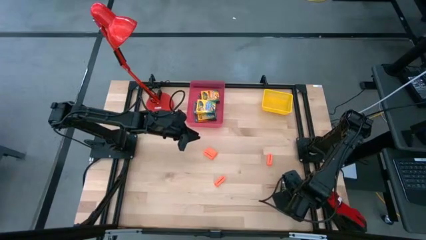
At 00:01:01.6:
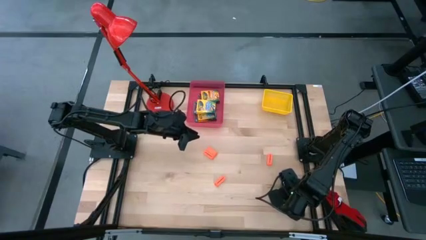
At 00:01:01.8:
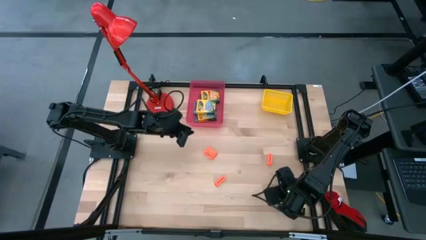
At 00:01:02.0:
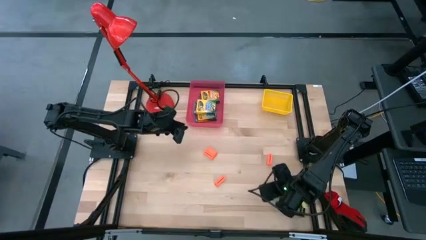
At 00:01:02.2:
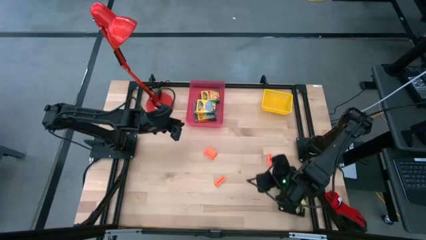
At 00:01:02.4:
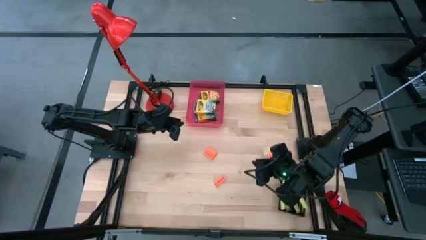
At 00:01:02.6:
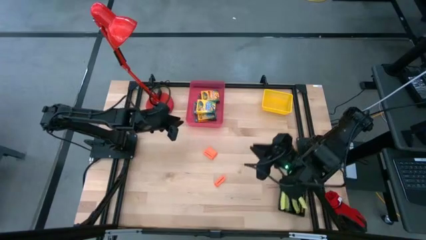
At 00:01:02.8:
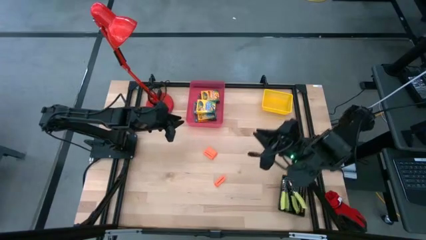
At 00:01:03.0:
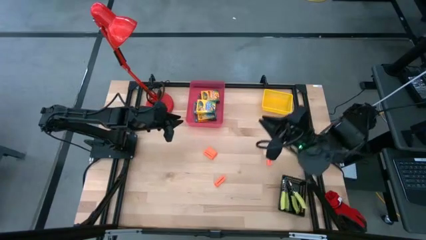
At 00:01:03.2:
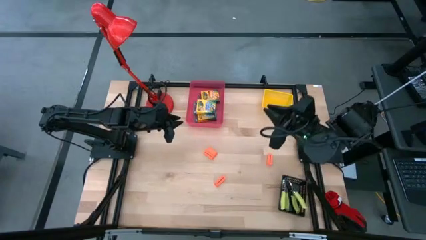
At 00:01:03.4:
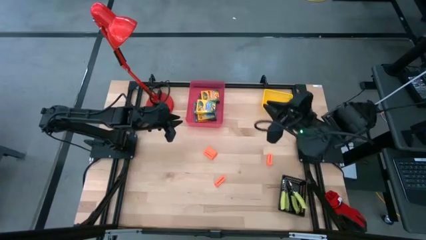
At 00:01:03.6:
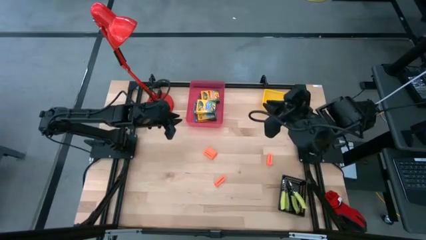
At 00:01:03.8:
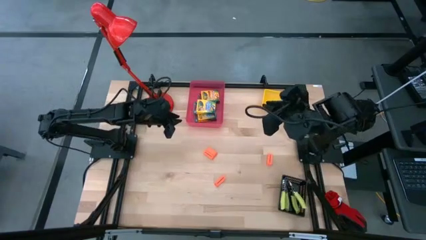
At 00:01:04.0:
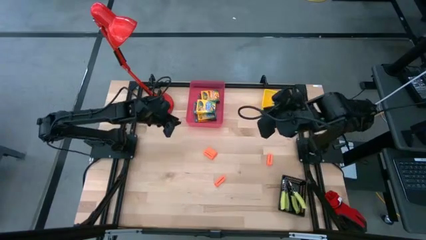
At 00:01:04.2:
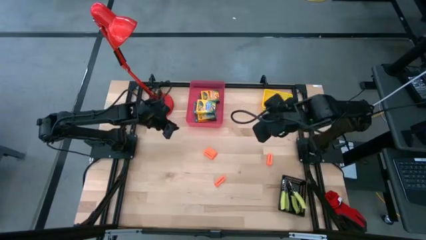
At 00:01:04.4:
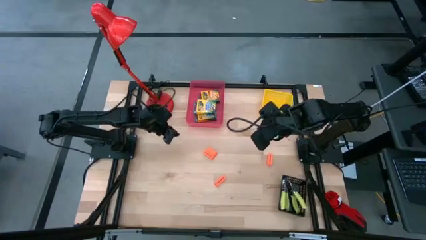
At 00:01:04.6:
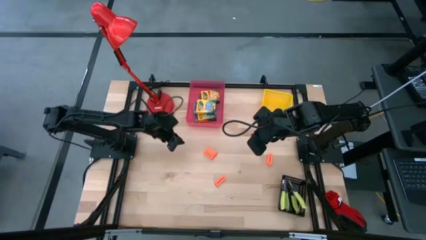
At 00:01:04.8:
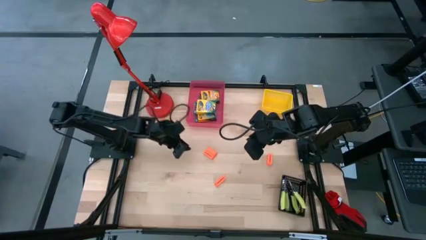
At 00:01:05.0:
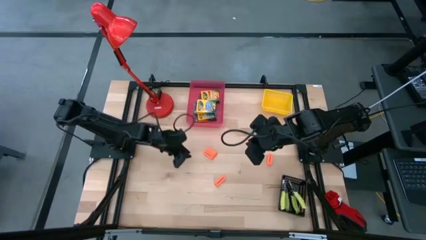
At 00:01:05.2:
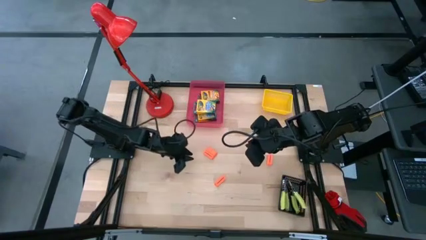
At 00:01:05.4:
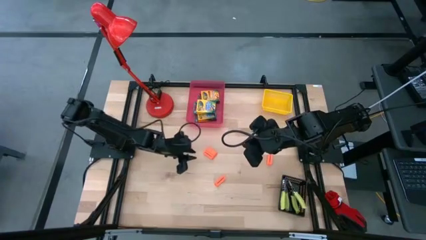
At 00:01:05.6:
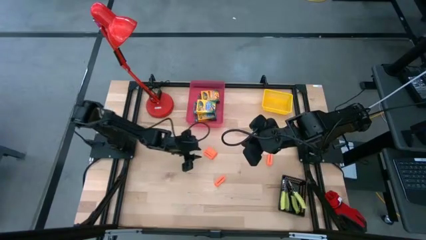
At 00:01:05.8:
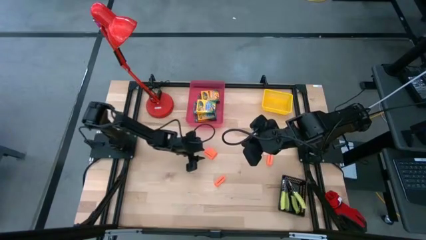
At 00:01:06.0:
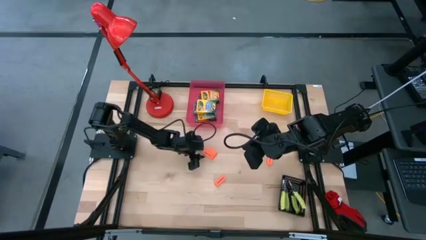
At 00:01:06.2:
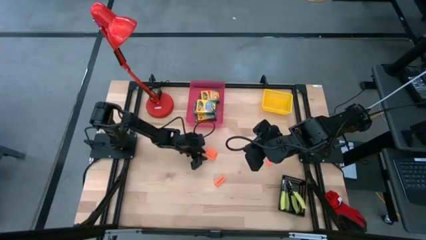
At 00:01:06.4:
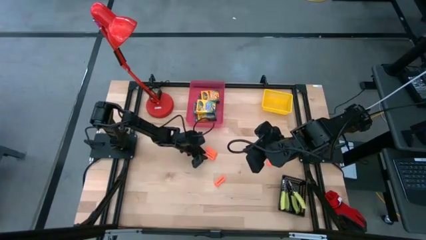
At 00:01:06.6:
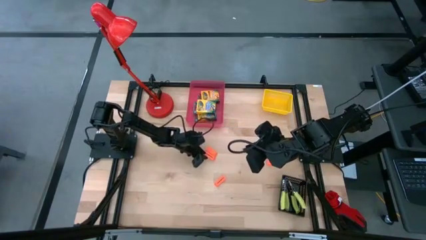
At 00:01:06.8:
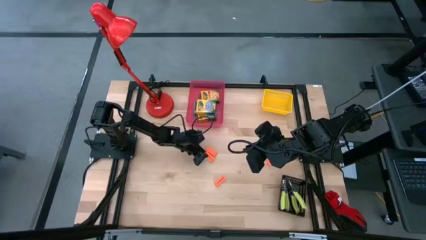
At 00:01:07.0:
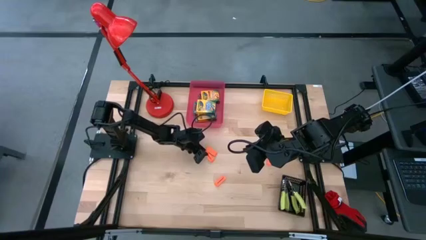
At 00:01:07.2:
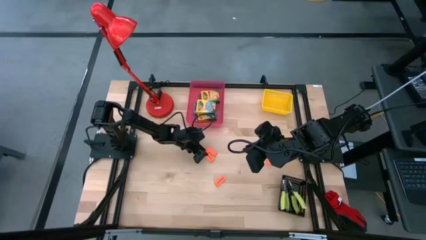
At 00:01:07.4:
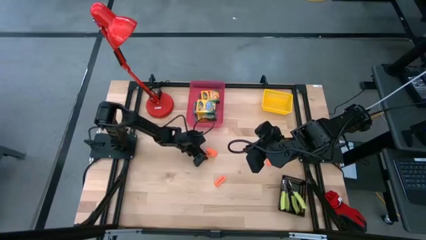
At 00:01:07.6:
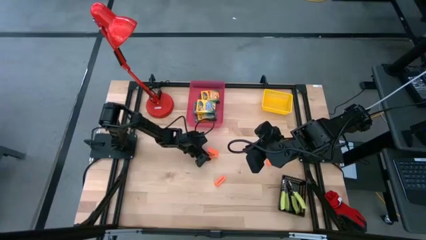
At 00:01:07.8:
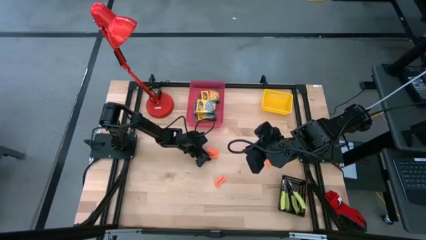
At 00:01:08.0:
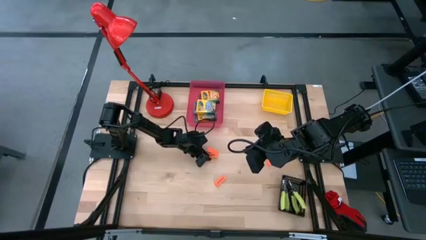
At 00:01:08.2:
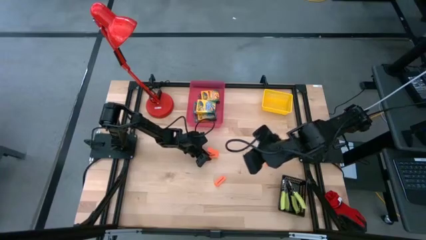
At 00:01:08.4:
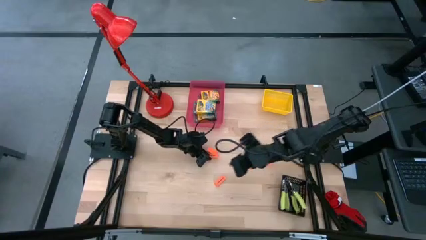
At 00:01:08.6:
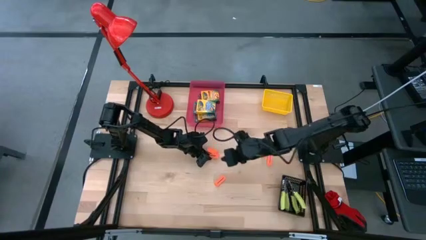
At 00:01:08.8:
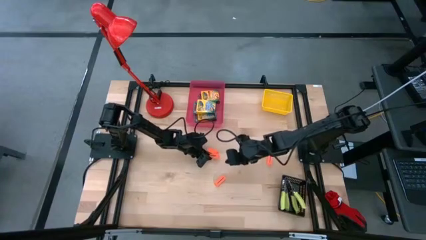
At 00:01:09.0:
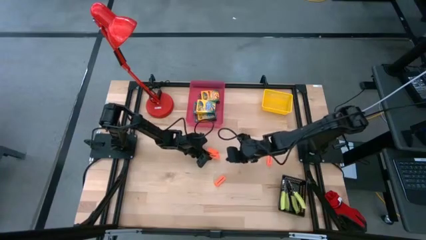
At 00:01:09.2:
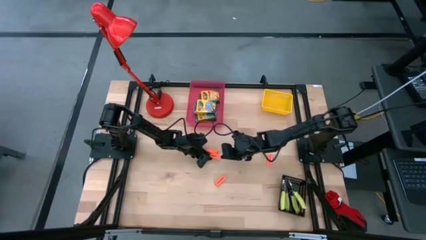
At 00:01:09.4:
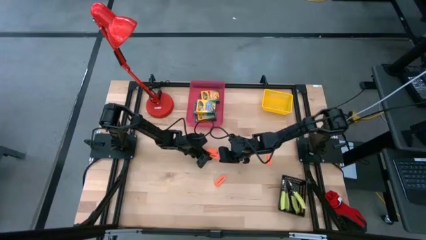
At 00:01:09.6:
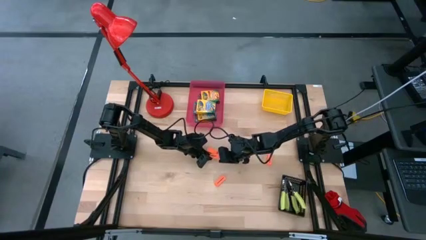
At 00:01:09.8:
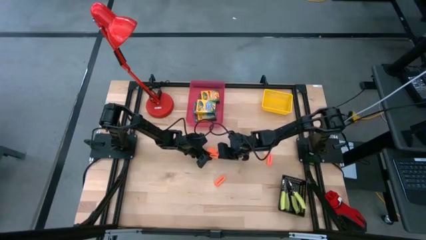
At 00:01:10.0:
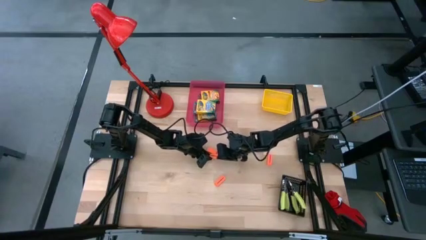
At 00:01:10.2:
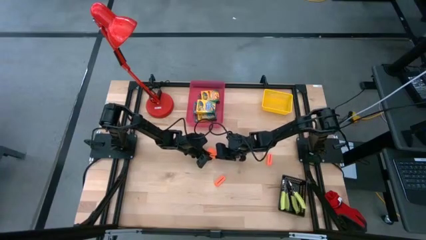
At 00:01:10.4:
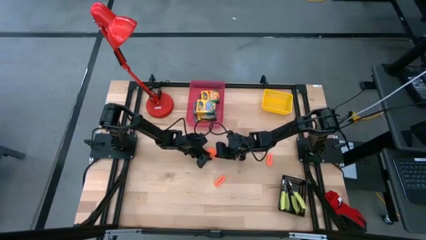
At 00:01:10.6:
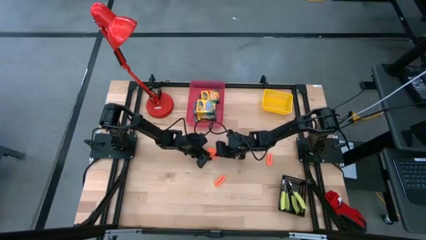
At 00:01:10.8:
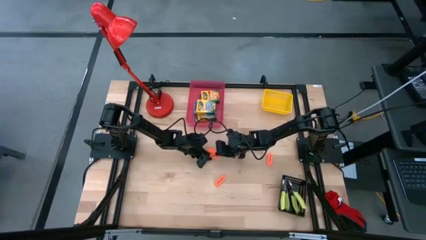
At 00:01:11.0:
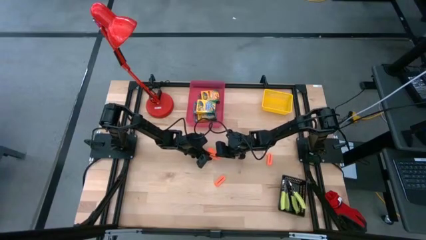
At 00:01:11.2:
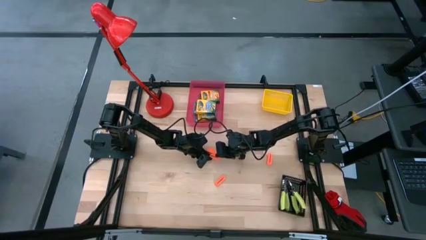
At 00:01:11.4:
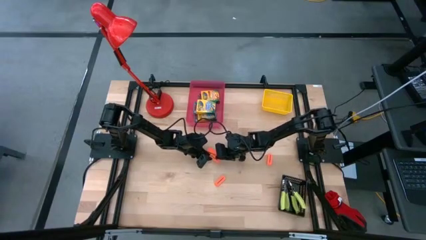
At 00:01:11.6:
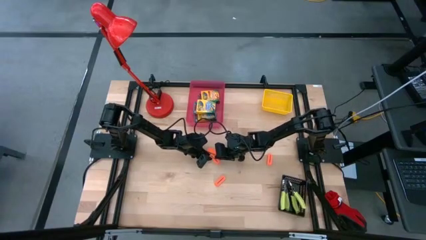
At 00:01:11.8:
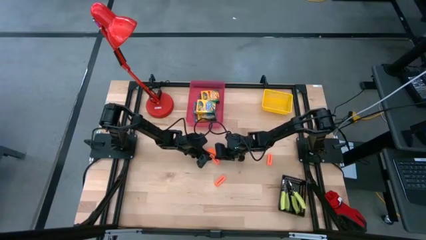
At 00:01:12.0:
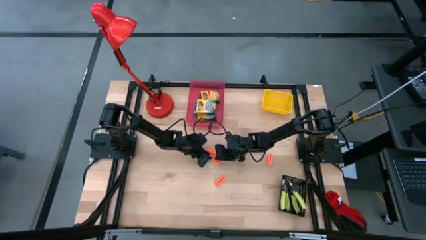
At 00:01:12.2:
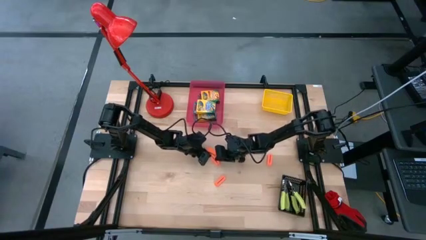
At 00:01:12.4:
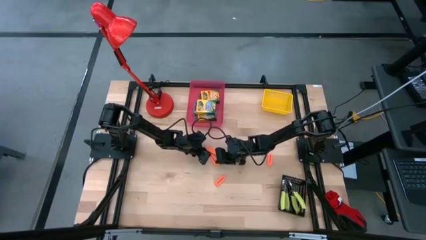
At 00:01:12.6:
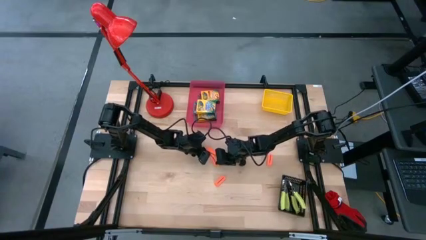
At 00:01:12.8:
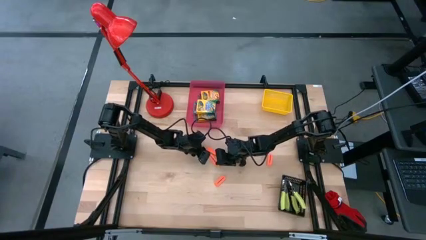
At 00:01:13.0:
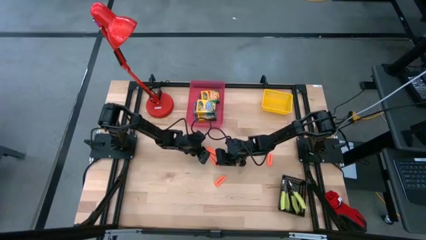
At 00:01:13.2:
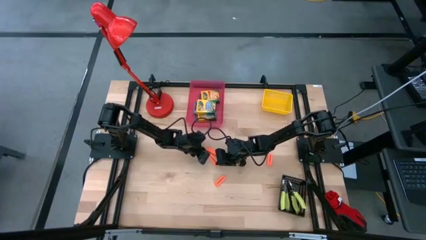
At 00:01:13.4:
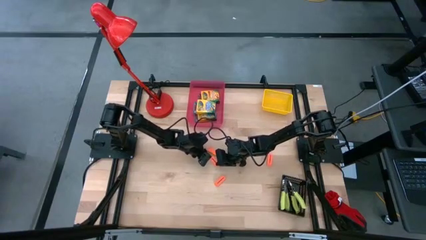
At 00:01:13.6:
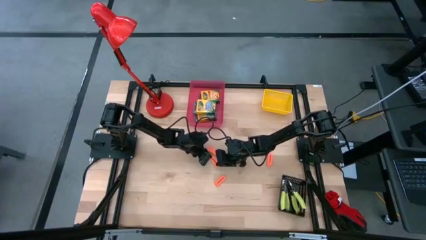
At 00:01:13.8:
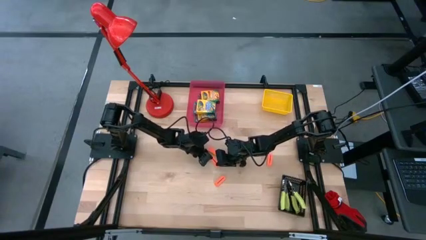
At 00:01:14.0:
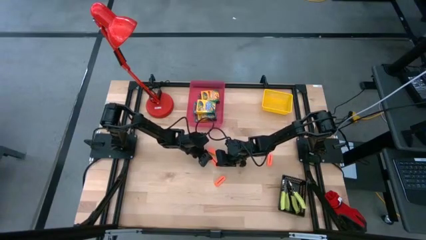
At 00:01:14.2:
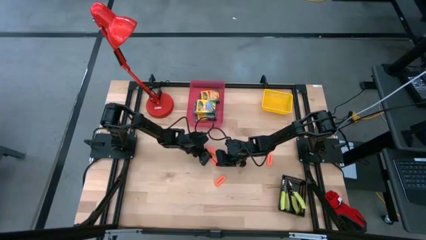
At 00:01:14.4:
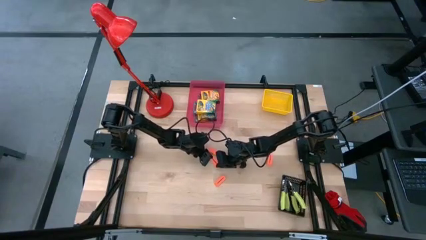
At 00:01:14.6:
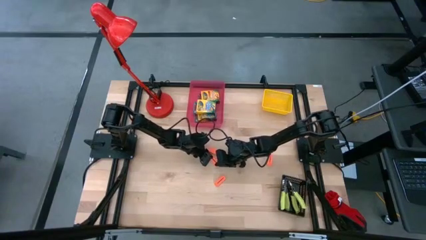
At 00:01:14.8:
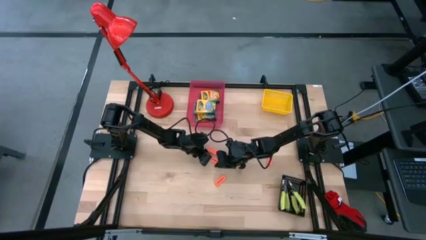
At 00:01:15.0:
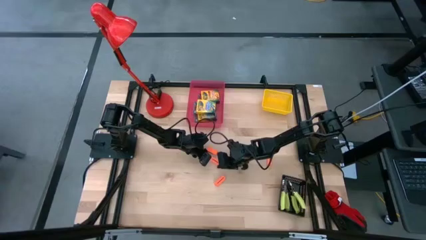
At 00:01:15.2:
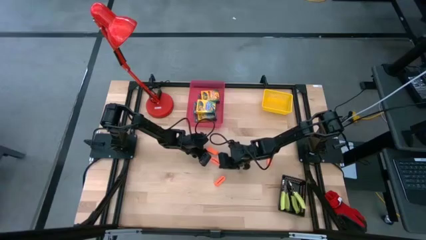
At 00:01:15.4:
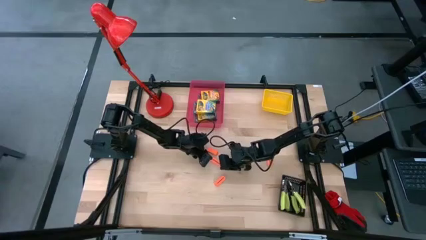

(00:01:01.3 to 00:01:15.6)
Task: Pick & Place School Supplies
Put the orange eraser into the yellow bin
